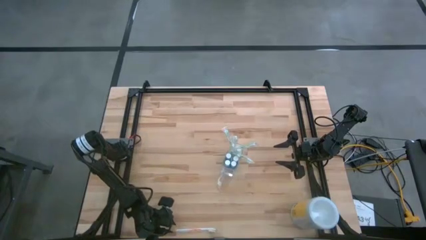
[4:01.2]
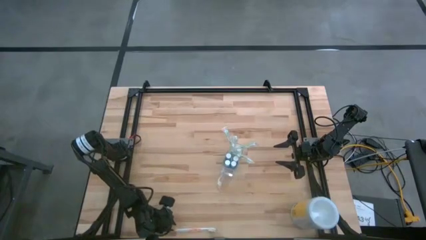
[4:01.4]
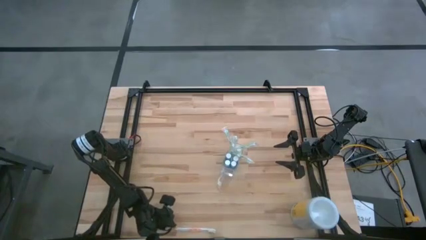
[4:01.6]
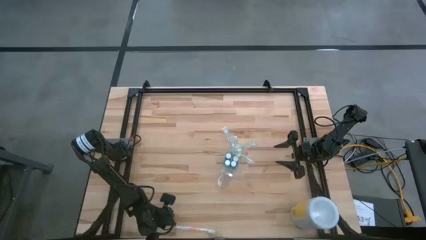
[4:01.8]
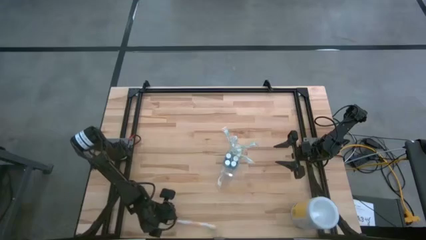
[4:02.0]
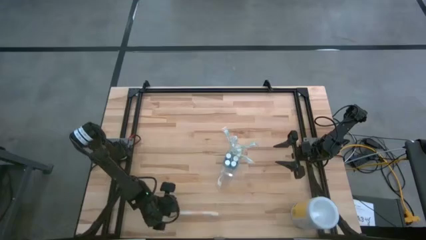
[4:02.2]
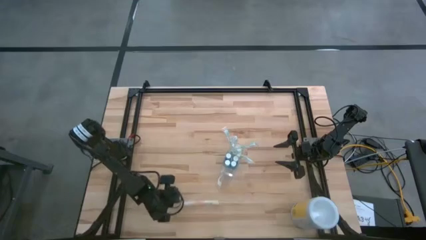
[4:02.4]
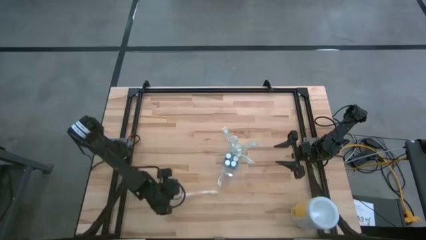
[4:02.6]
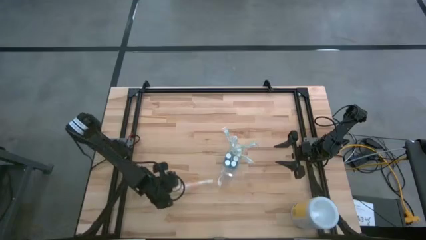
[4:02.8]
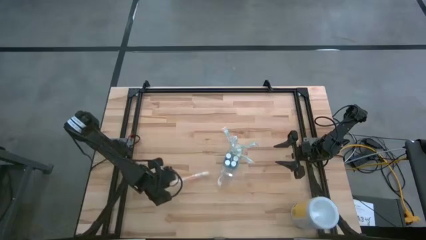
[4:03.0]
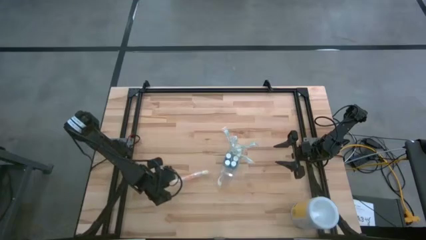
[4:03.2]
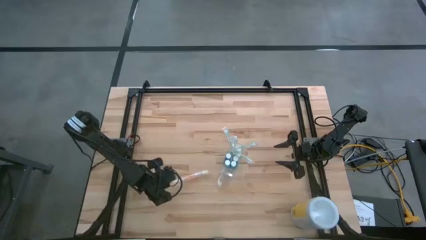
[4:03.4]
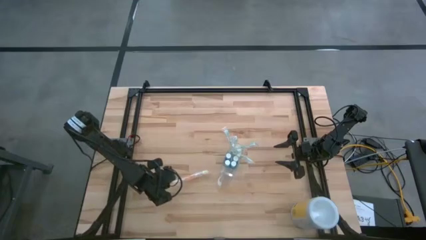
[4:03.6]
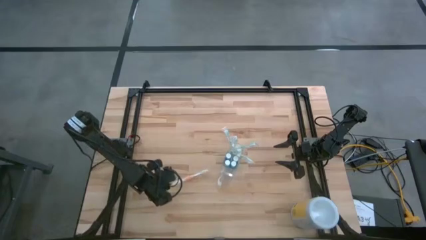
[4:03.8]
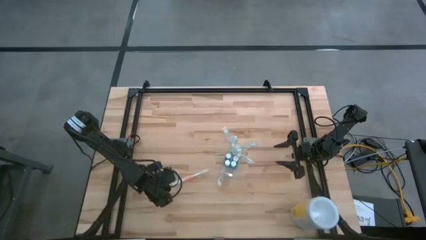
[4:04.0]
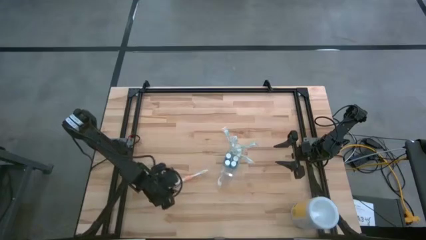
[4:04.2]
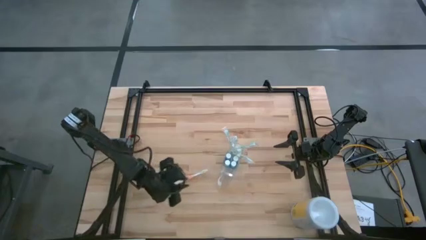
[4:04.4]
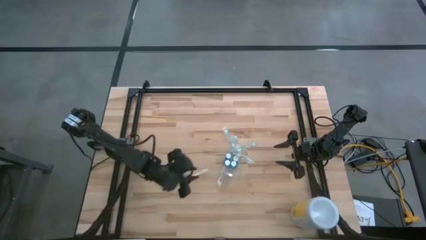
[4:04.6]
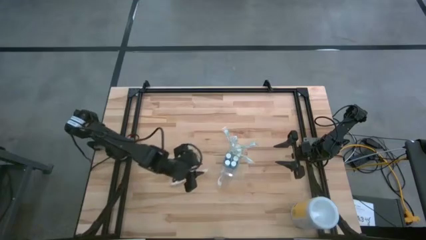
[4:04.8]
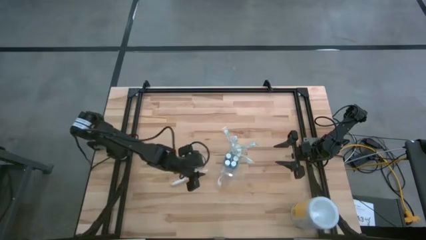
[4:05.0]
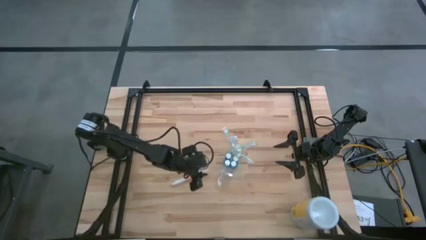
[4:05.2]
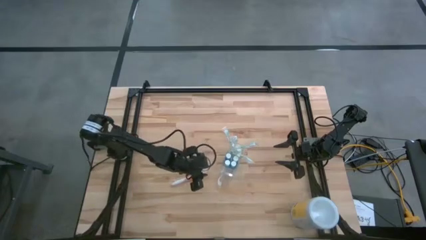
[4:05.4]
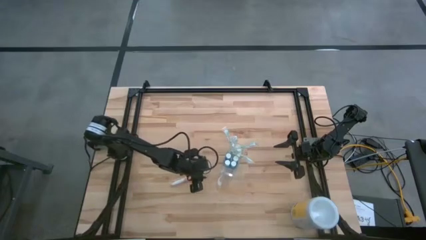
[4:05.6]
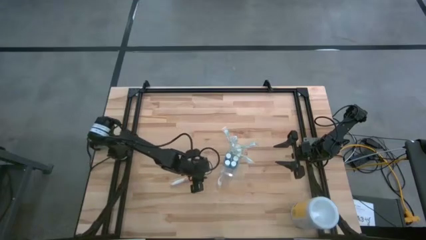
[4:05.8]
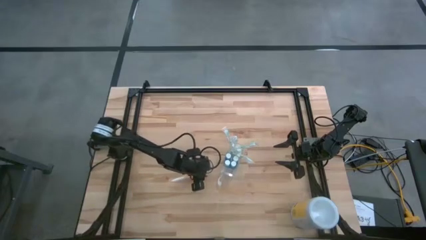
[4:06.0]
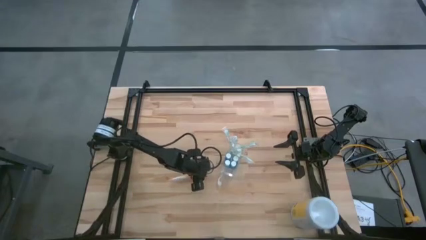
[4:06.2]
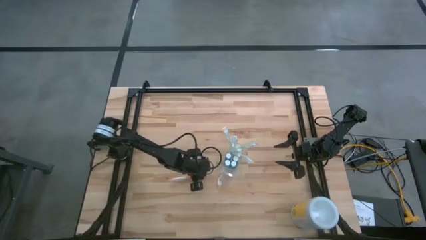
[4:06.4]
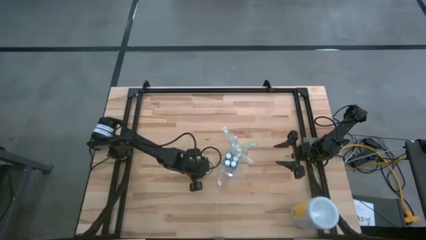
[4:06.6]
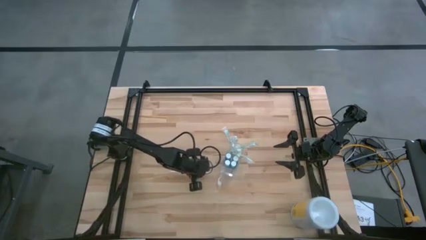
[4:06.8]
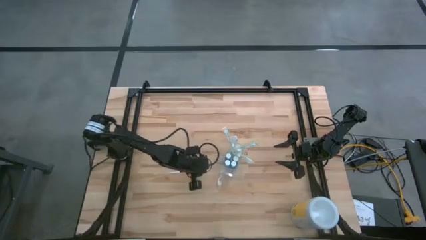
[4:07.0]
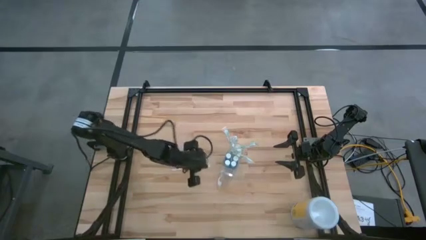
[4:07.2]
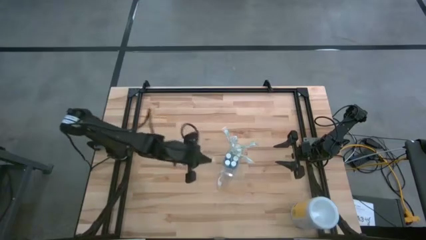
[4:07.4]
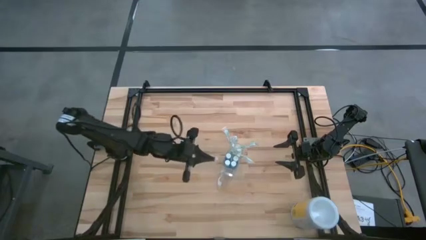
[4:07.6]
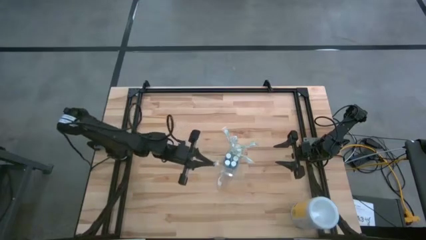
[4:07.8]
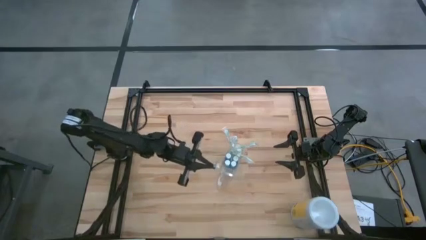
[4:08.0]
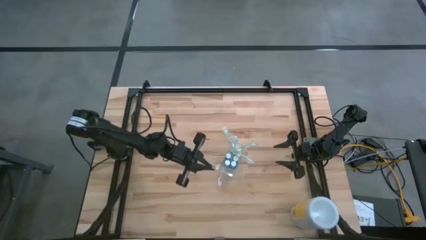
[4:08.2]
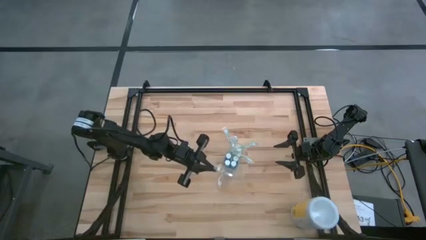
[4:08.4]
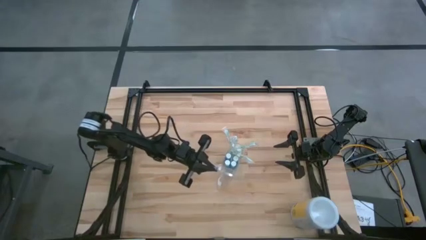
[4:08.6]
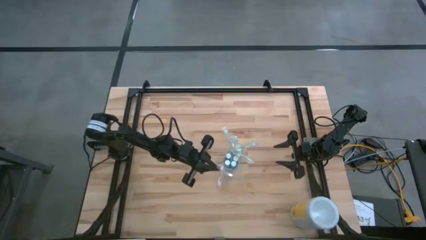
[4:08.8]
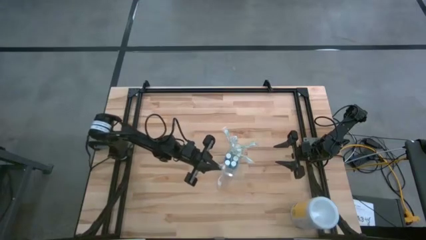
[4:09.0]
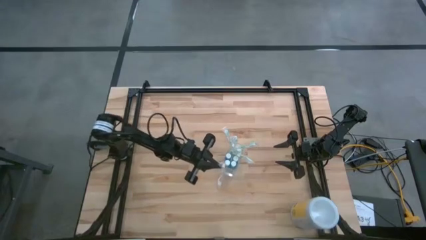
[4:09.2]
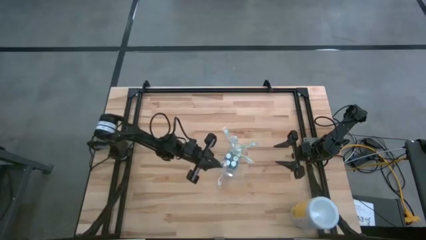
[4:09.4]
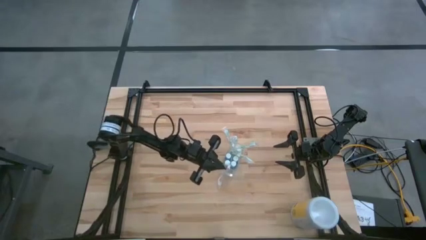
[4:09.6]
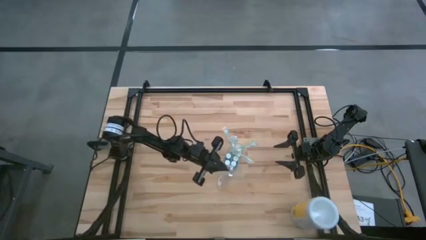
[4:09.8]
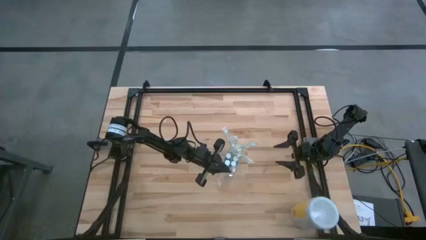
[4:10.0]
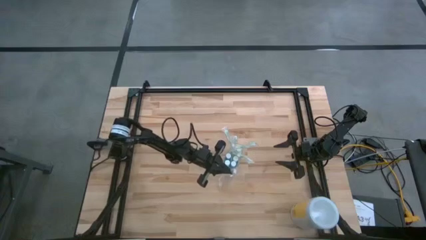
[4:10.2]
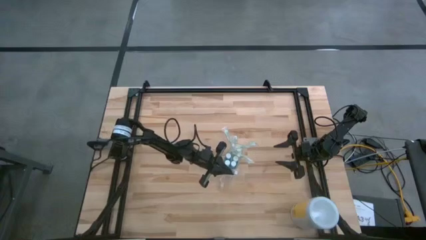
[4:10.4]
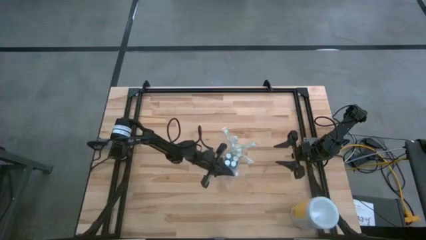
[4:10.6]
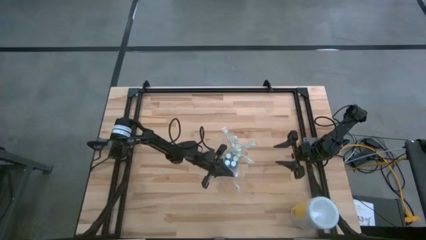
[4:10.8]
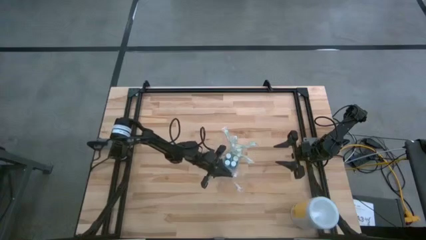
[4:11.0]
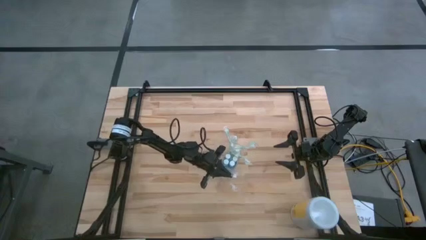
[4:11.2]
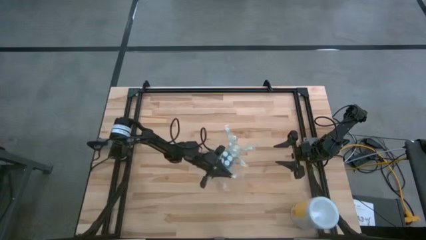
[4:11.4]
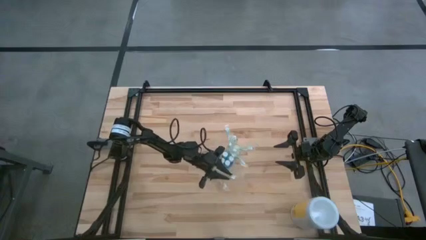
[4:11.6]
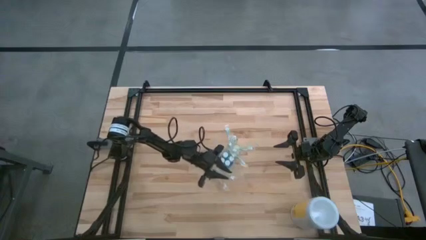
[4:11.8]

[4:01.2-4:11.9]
Task: Pick & Place toothbrushing station
Put the white orange toothbrush into the front side of the transparent organizer

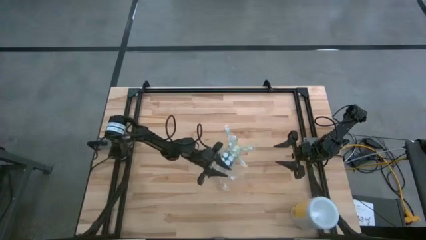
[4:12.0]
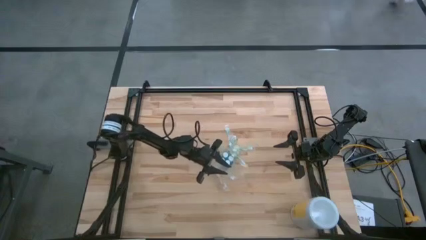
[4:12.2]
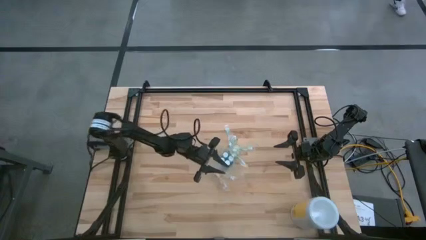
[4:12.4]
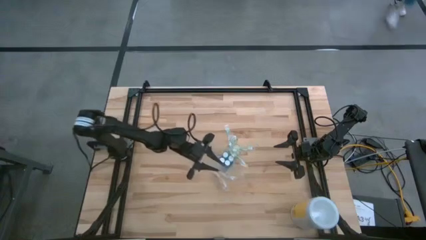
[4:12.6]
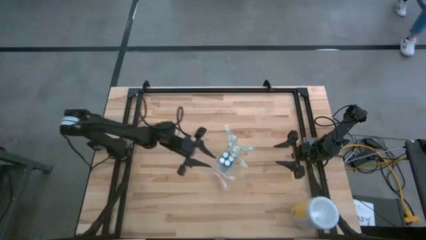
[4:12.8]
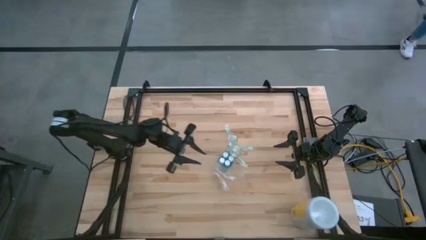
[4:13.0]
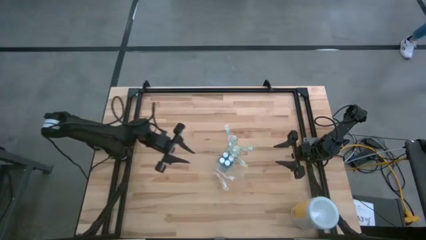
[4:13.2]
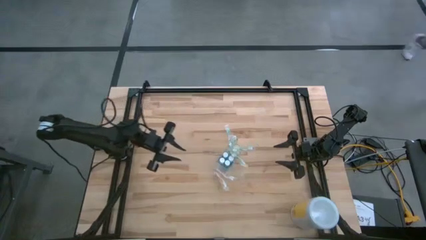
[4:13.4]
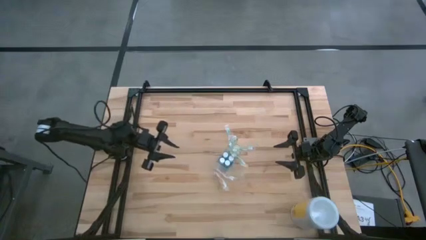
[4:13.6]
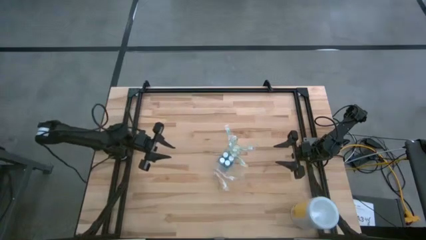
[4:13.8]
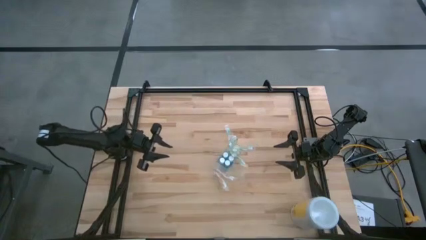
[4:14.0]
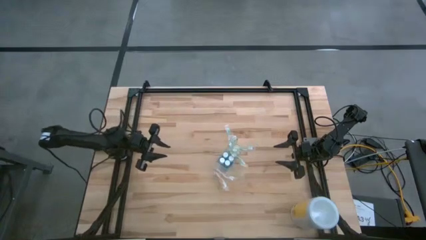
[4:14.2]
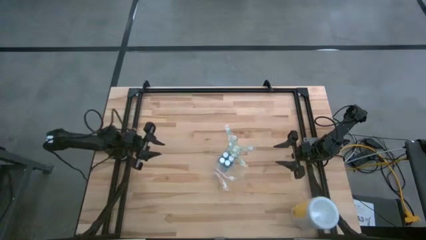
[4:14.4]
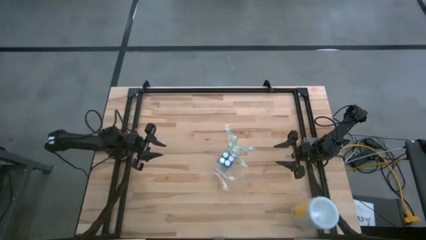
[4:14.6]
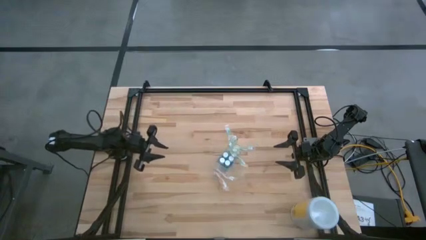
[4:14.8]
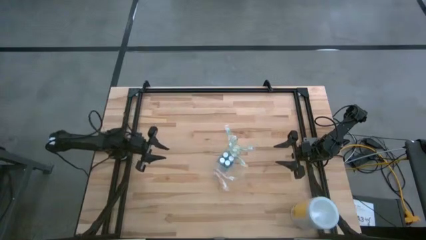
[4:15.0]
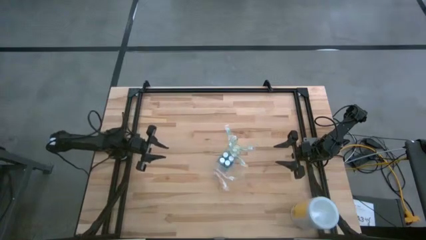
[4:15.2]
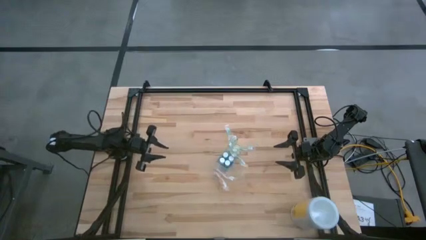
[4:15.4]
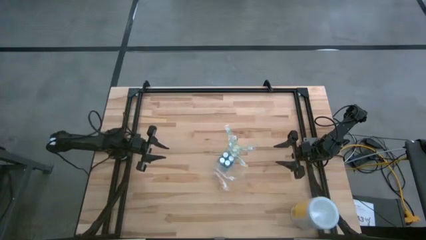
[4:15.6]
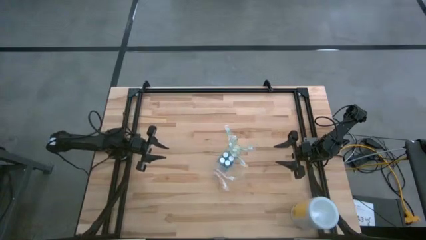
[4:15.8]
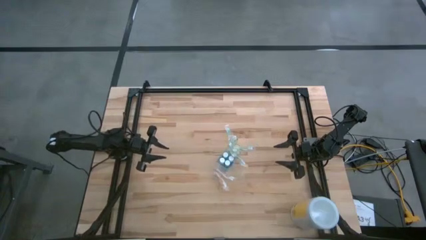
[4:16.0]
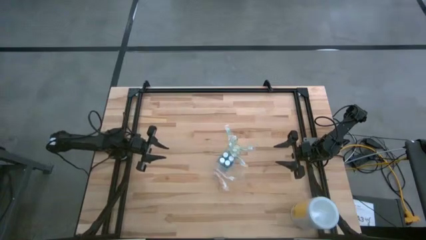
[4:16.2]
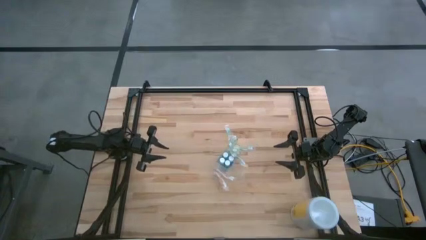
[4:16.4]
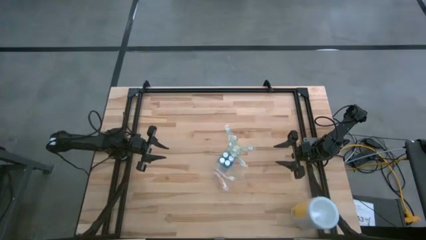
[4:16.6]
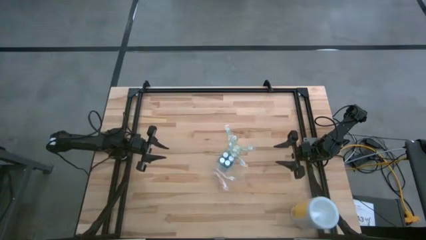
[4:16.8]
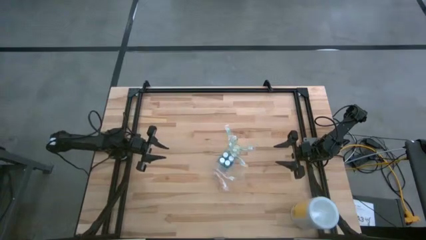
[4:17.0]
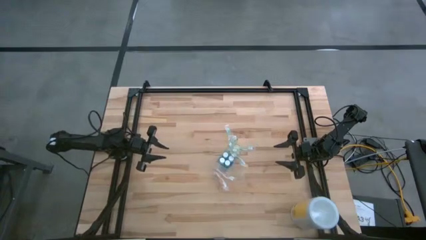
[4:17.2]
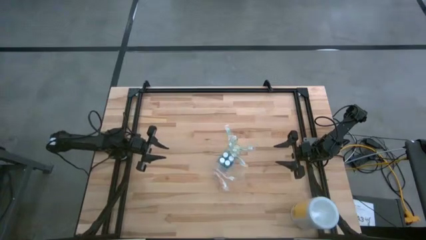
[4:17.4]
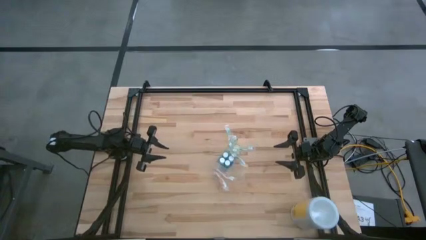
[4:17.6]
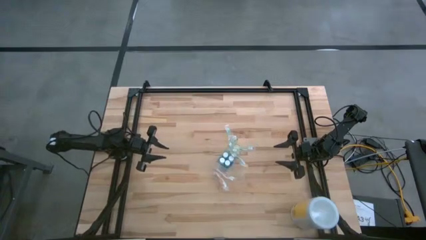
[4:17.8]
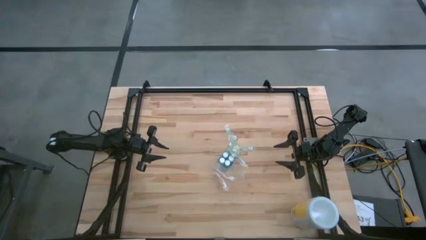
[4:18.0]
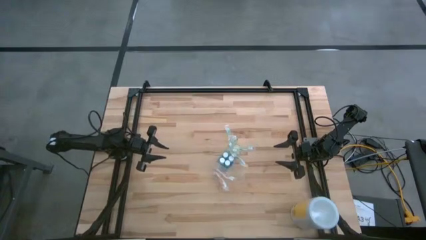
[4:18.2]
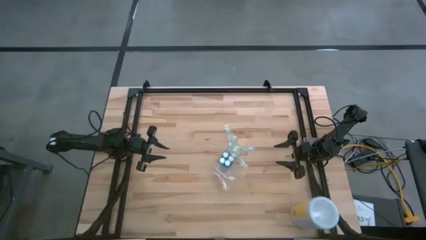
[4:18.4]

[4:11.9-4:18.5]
Return to Home Position
